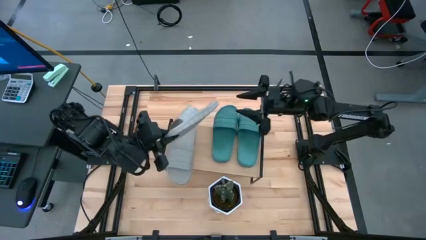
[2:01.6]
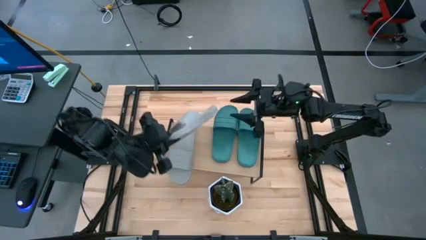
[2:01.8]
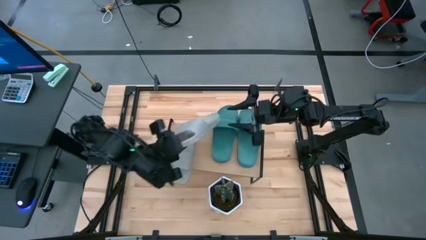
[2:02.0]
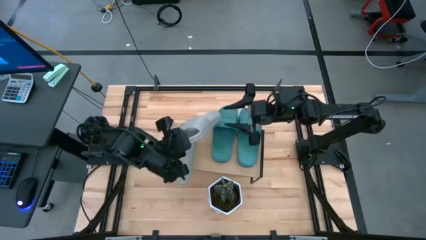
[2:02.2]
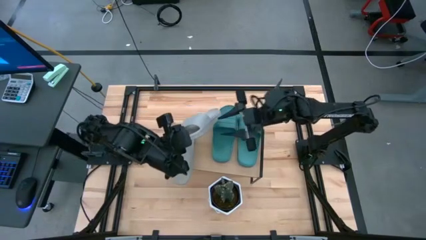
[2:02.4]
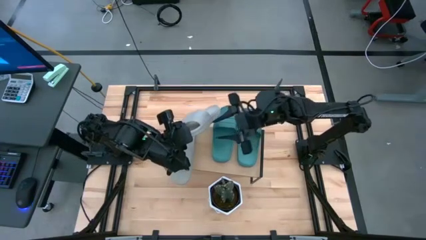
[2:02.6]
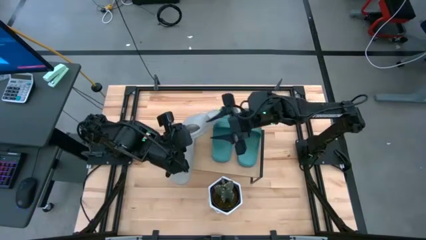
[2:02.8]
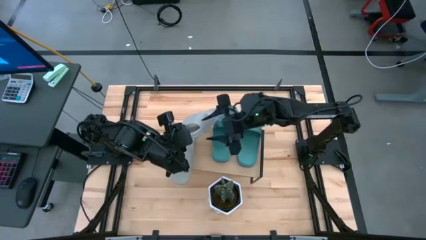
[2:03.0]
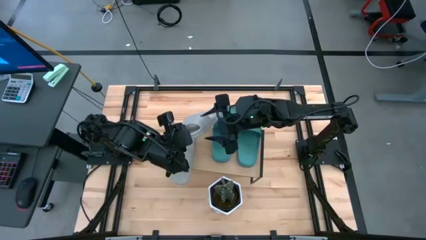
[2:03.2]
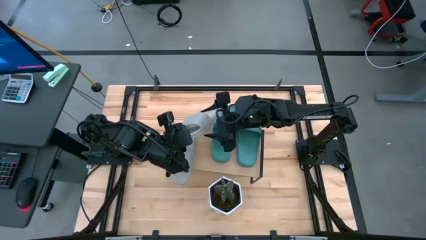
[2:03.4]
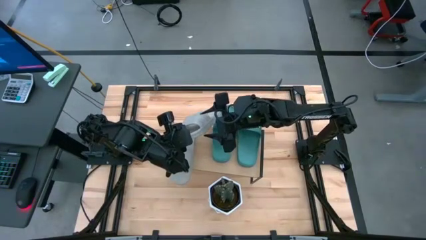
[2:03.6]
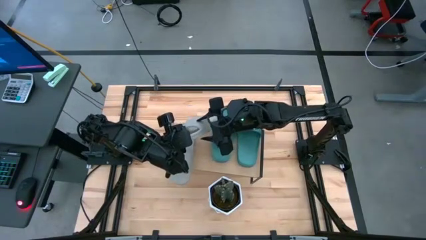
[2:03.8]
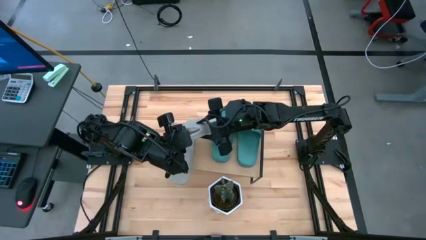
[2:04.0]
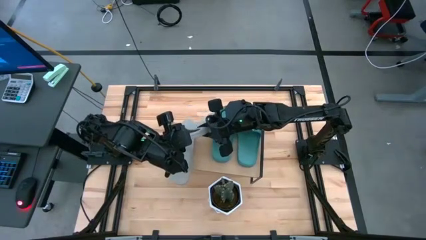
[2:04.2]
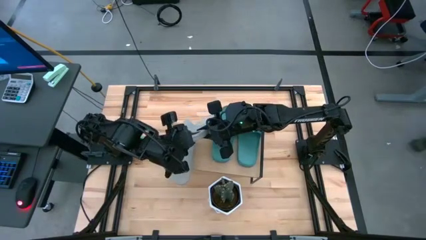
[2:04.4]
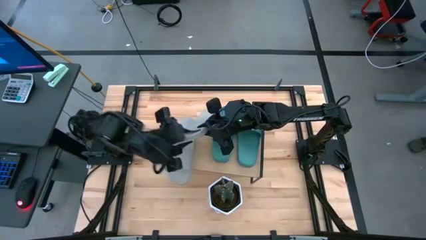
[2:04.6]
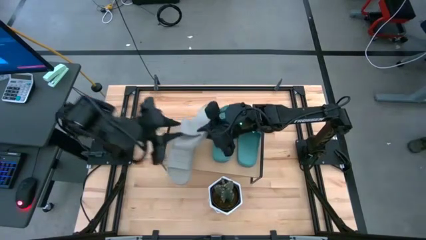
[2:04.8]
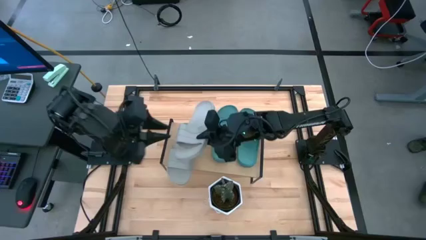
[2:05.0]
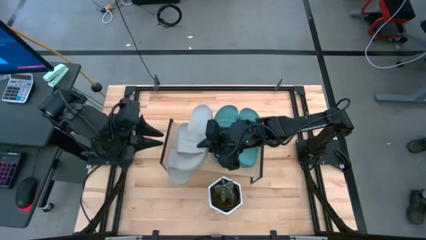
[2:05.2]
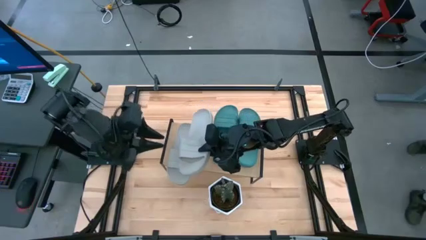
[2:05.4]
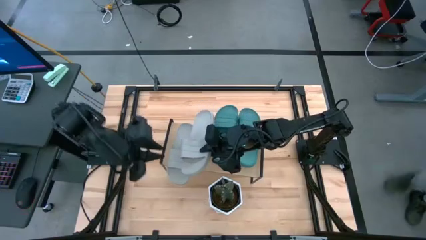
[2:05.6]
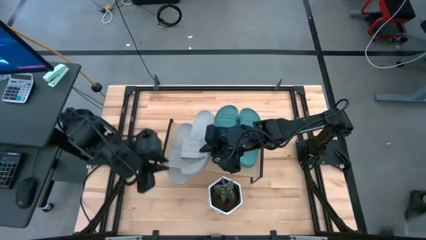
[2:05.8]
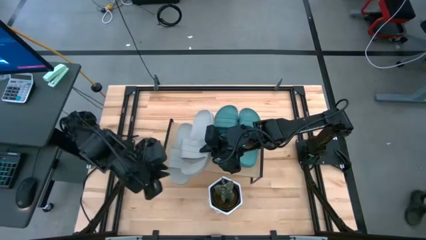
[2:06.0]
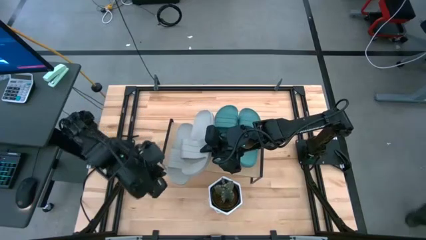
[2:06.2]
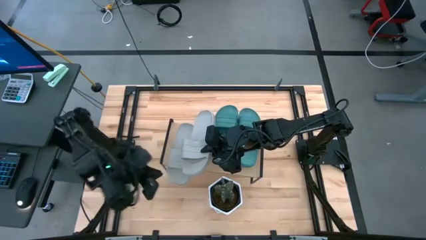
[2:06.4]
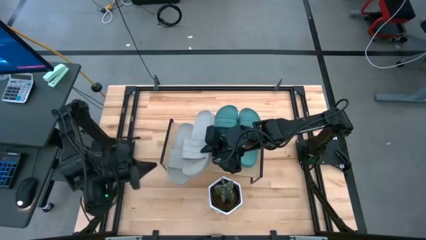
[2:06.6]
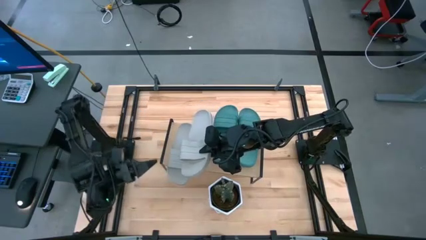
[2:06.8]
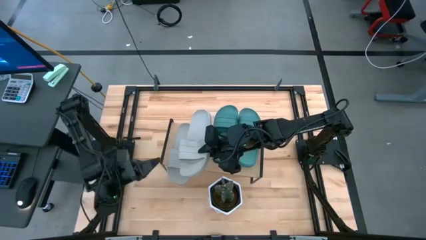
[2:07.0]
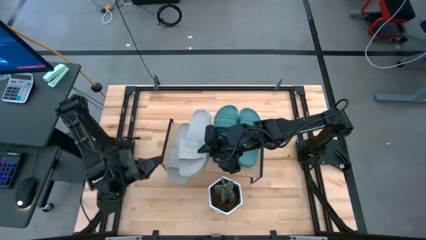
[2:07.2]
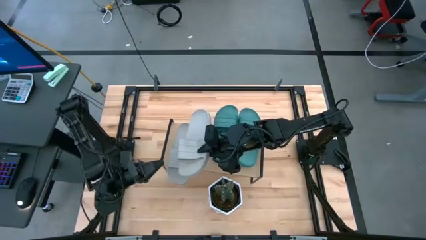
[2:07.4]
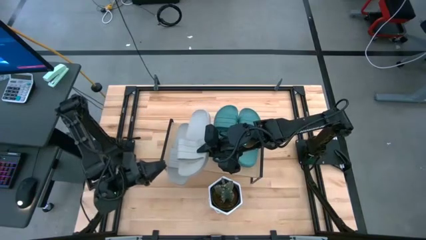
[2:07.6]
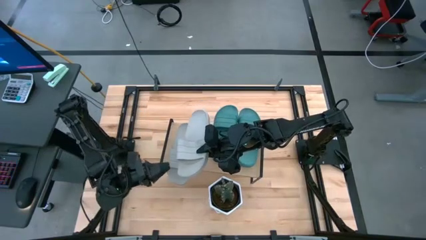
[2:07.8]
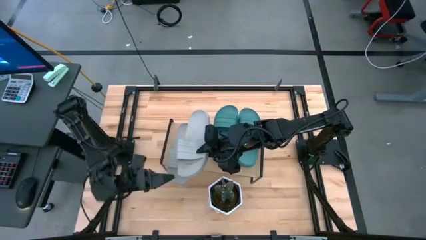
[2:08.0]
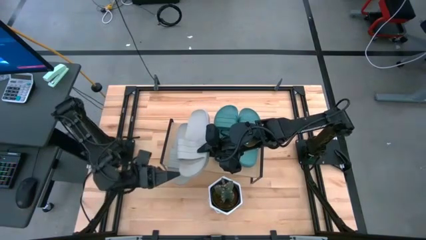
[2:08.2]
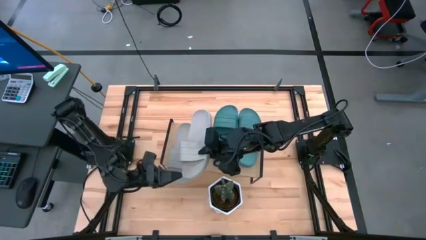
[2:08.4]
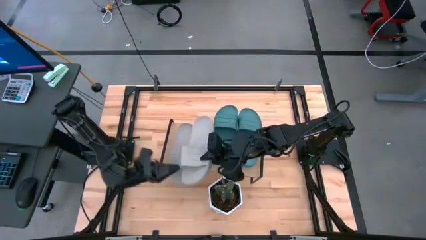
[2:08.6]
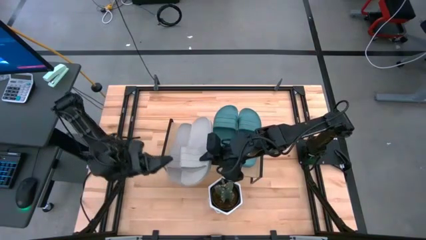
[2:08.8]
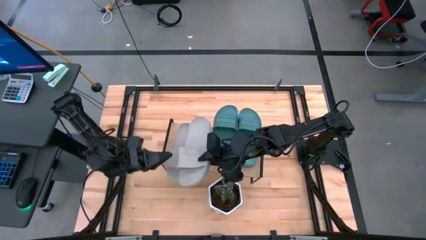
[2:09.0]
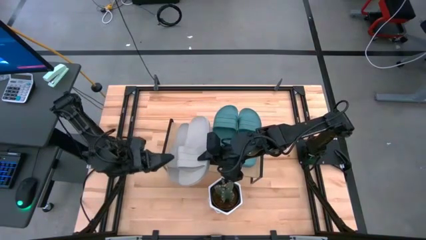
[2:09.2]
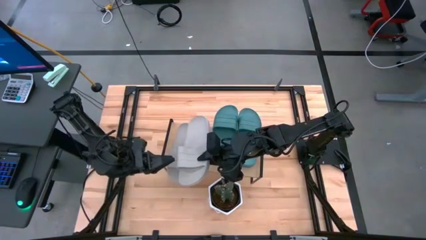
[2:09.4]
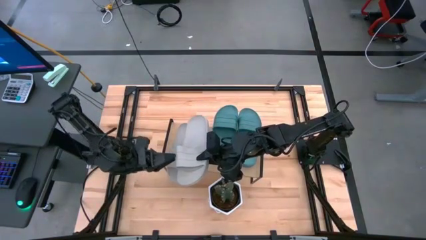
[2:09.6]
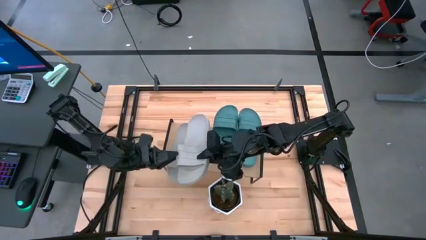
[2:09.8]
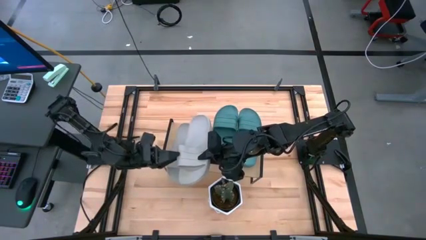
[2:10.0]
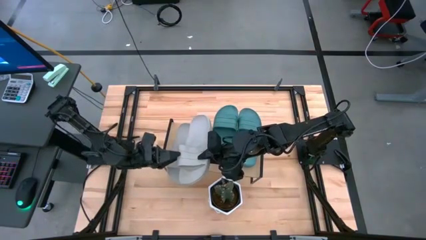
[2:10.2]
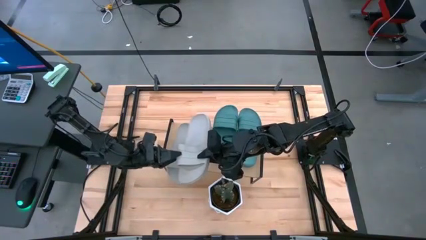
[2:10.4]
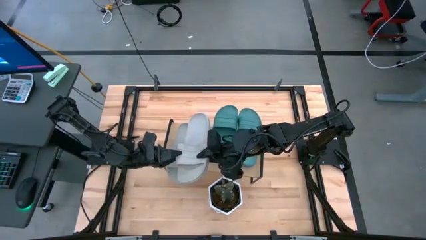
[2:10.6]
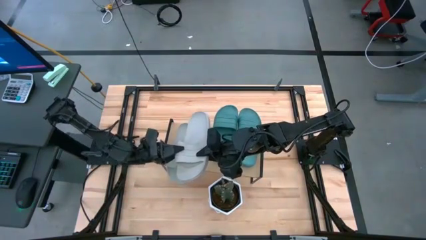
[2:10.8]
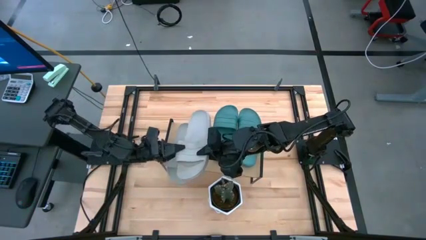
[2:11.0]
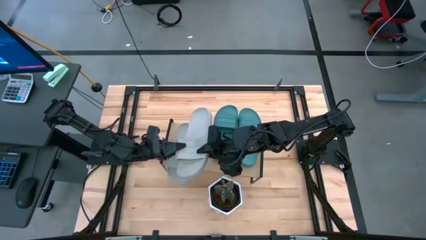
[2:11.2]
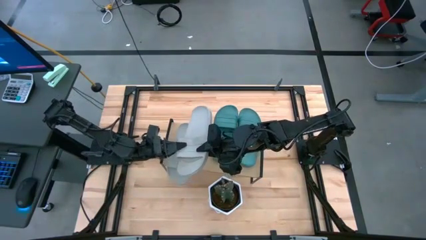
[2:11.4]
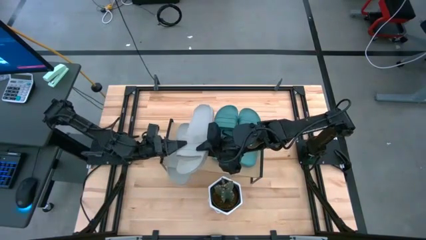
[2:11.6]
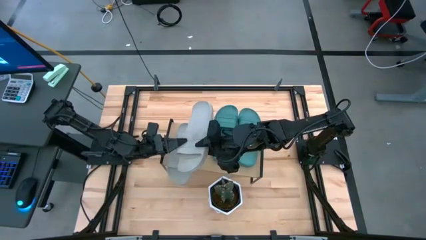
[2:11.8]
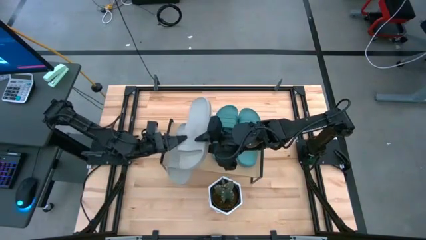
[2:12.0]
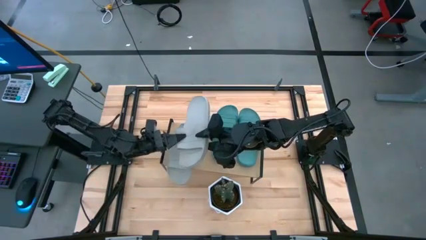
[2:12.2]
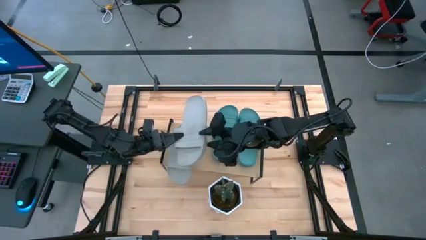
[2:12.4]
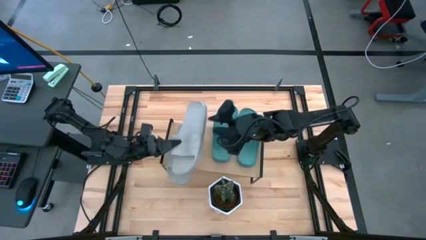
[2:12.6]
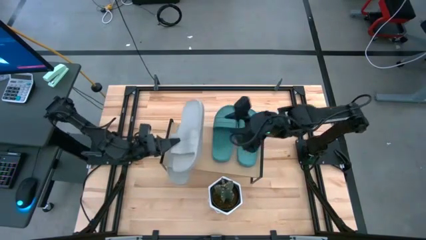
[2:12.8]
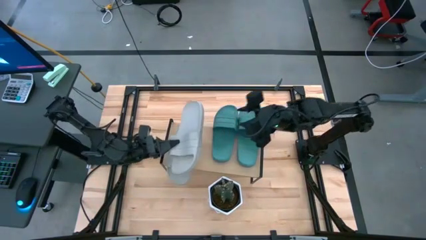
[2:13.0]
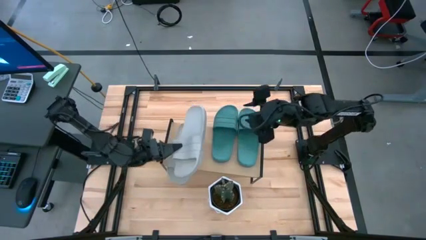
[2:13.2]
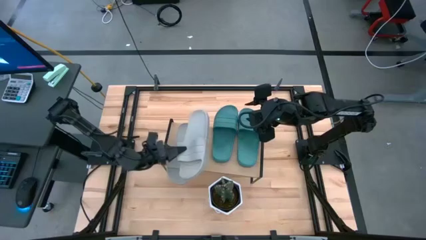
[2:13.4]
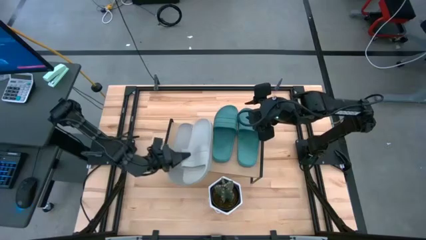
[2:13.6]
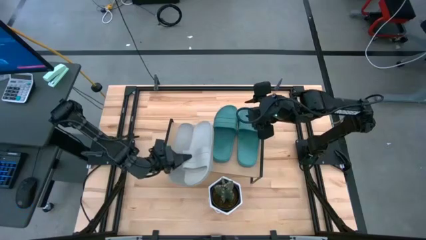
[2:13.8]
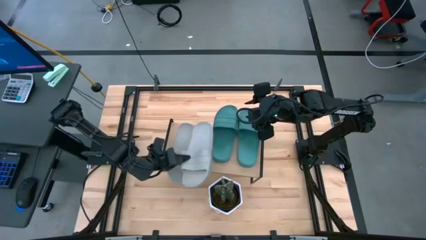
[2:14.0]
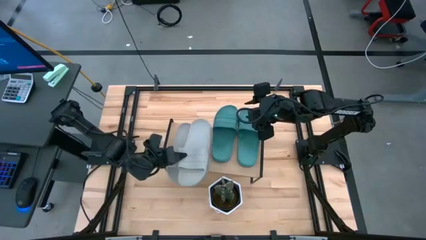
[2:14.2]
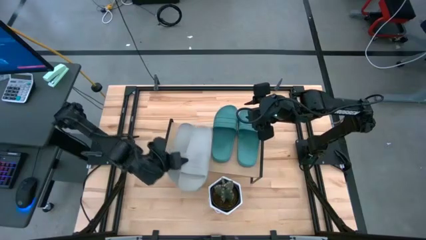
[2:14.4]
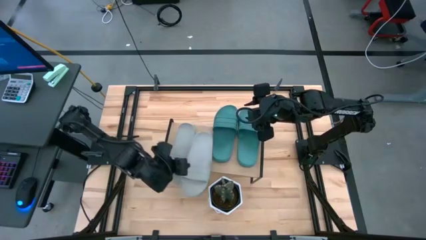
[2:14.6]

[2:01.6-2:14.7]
Task: Pick and place slides into the shelf
Put the gray slide on the shelf

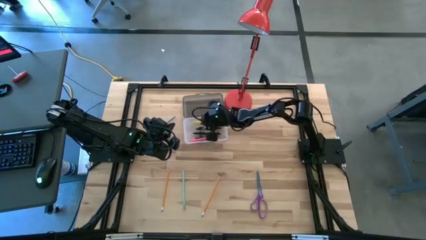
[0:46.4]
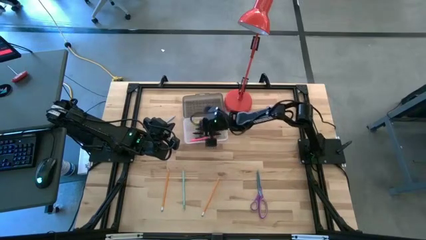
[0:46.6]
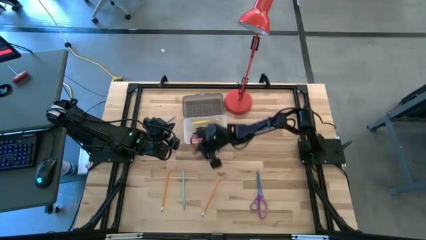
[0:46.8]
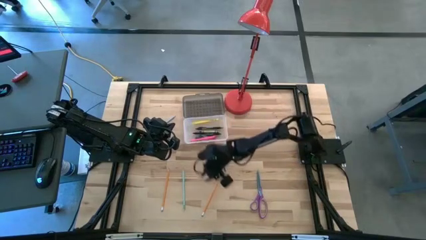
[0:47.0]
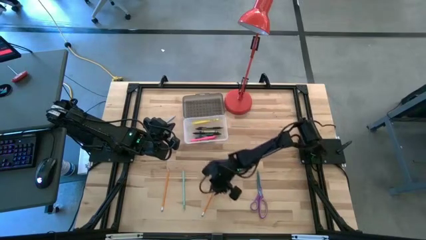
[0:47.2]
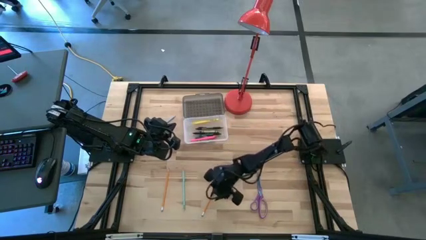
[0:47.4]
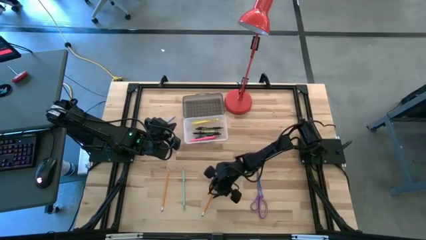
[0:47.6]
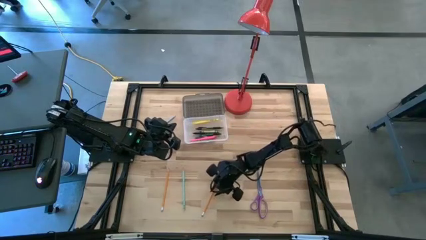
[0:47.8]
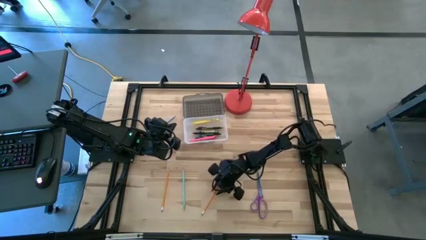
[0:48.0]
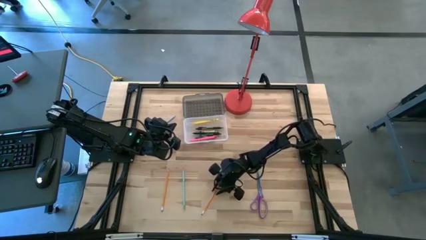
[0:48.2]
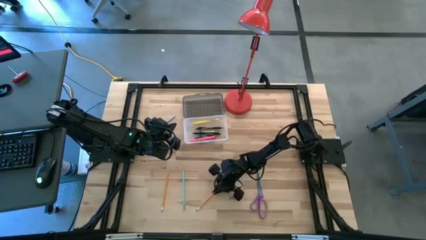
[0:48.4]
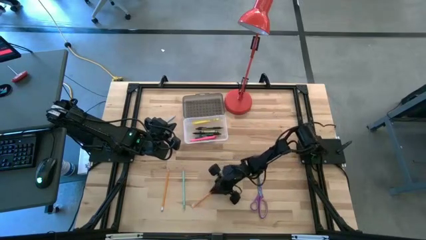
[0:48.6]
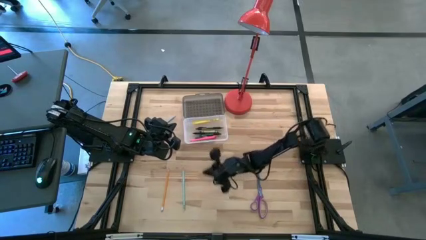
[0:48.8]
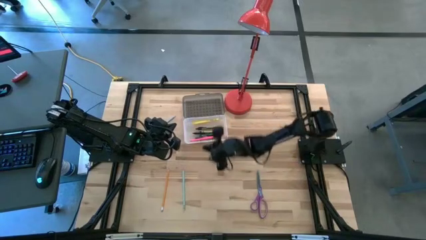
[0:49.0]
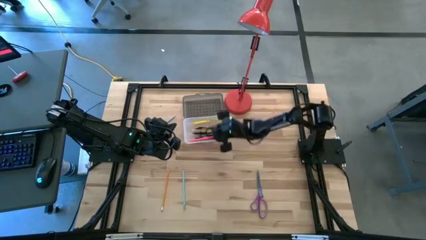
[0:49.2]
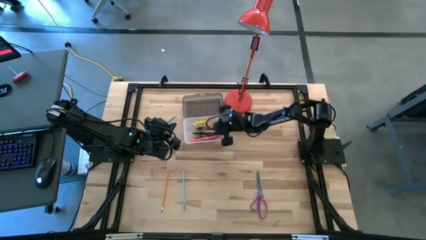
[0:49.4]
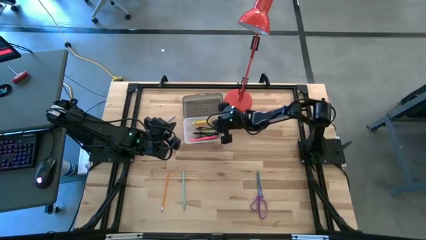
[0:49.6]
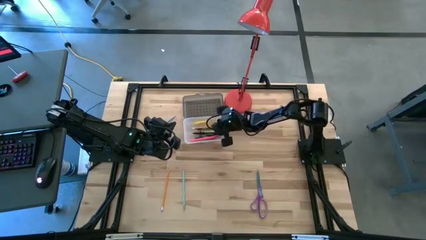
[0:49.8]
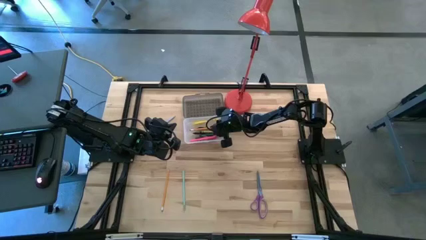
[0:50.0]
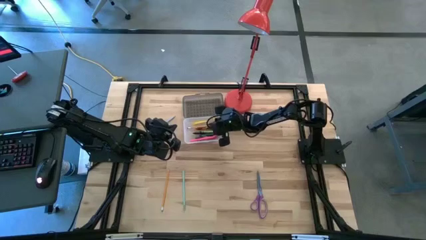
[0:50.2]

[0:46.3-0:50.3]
Task: Pick & place school supplies into a supply box
Put the right orange pencil into the black supply box
